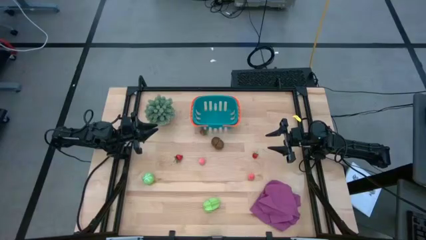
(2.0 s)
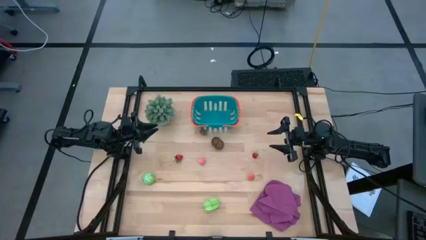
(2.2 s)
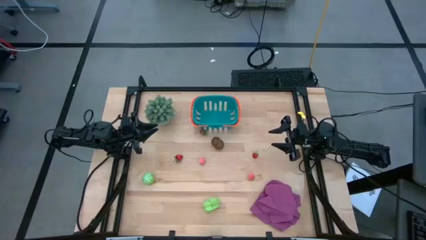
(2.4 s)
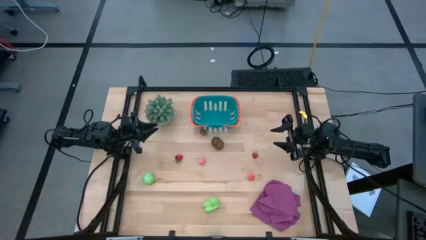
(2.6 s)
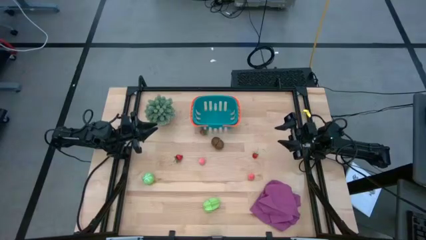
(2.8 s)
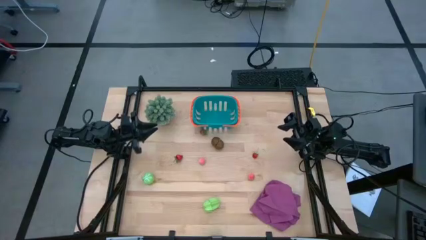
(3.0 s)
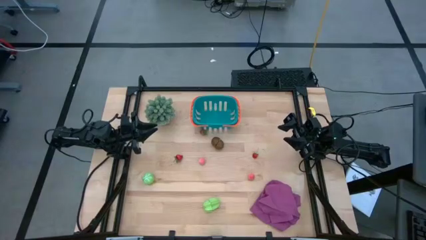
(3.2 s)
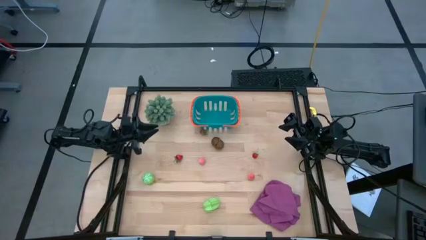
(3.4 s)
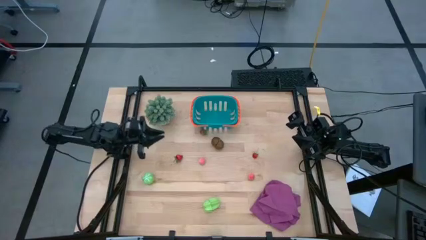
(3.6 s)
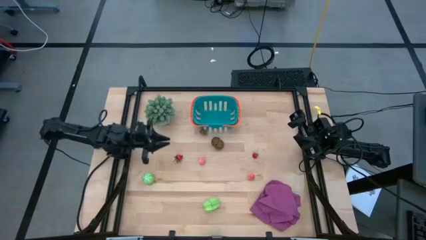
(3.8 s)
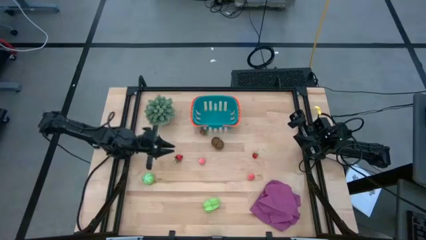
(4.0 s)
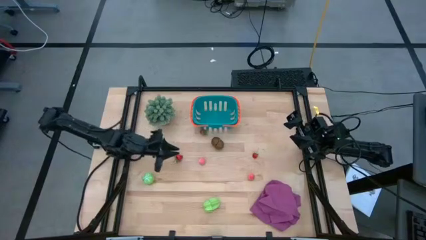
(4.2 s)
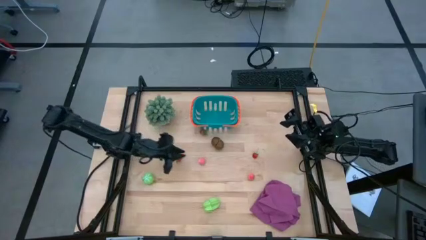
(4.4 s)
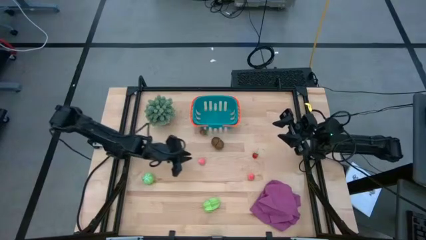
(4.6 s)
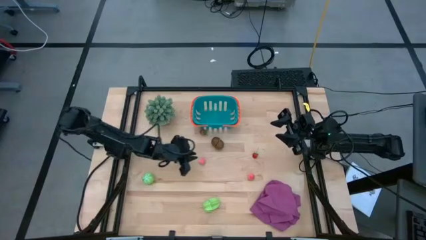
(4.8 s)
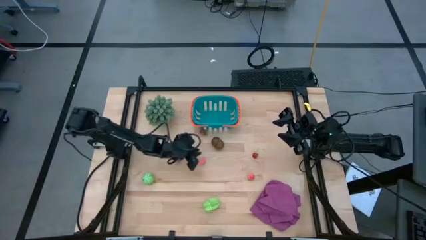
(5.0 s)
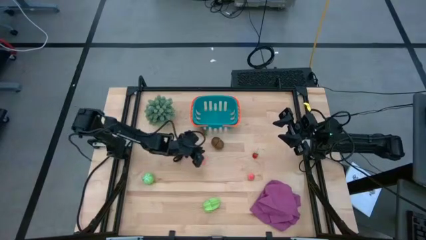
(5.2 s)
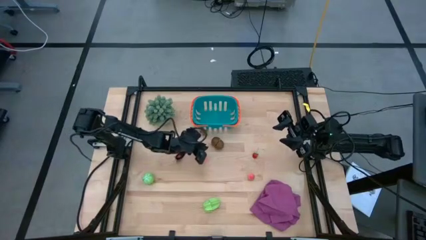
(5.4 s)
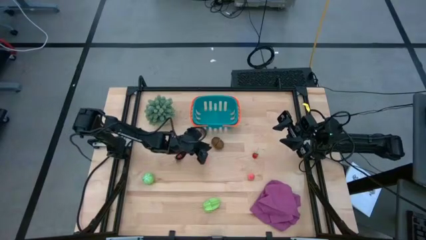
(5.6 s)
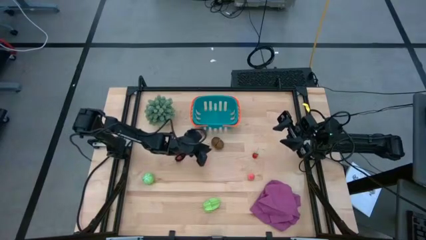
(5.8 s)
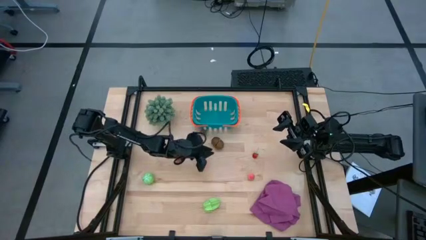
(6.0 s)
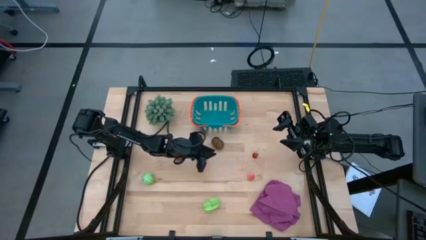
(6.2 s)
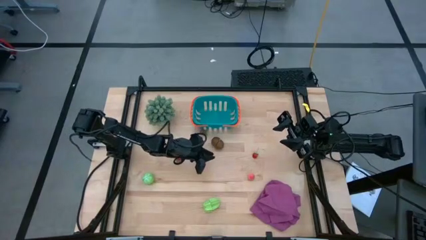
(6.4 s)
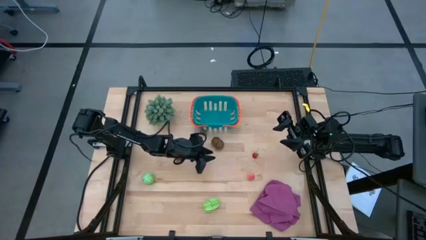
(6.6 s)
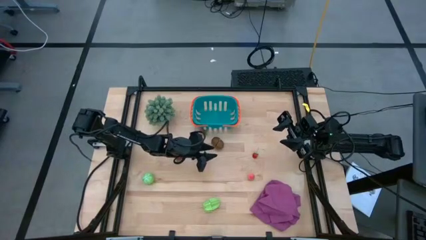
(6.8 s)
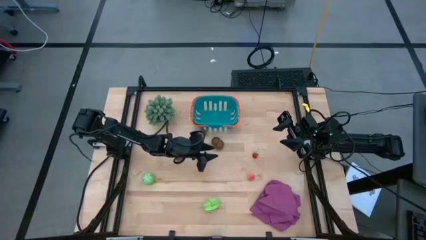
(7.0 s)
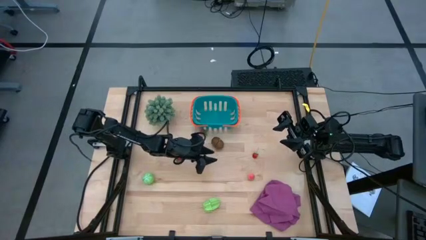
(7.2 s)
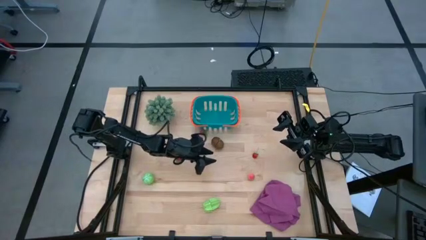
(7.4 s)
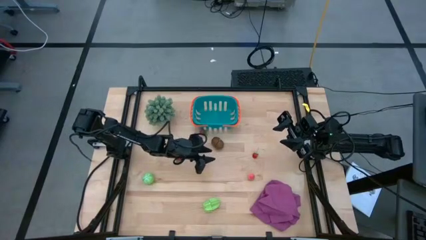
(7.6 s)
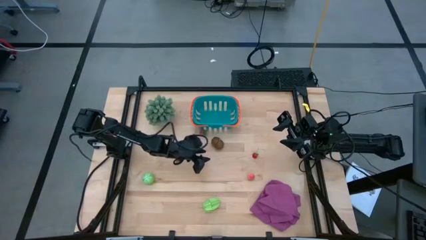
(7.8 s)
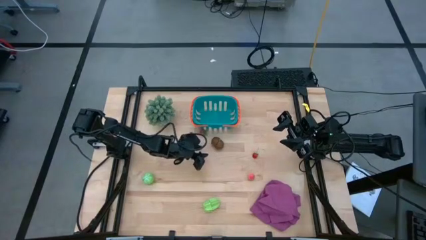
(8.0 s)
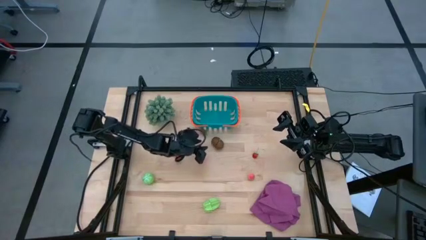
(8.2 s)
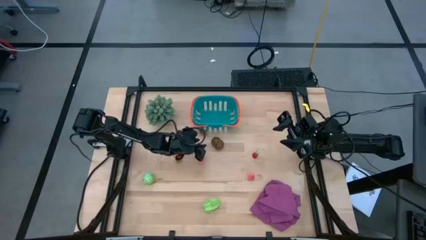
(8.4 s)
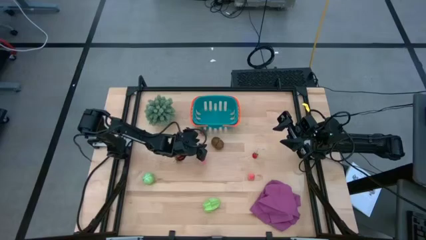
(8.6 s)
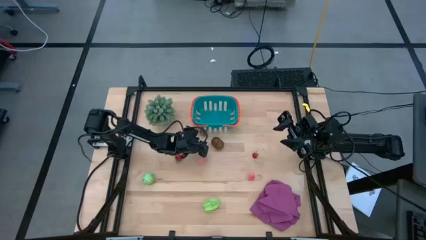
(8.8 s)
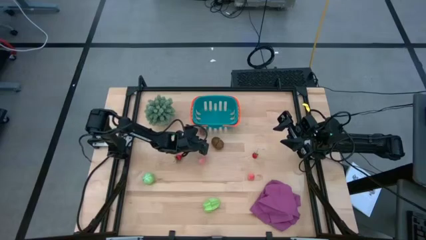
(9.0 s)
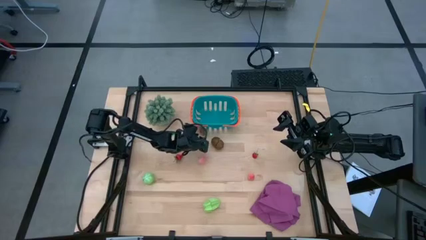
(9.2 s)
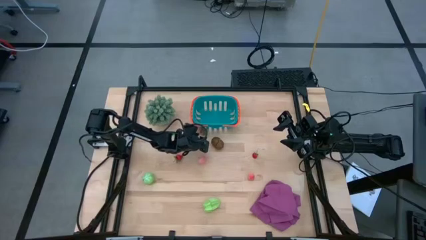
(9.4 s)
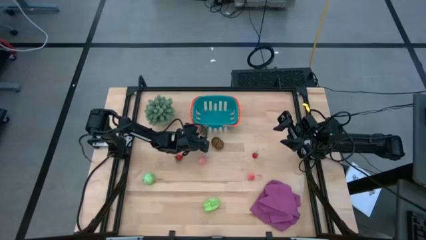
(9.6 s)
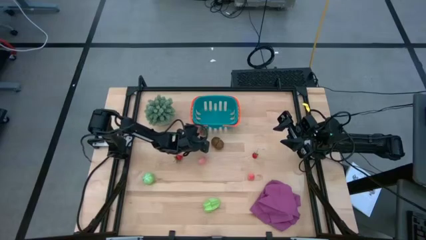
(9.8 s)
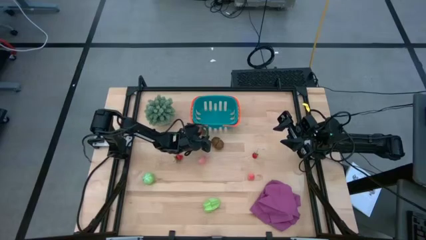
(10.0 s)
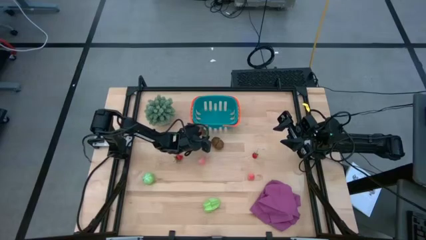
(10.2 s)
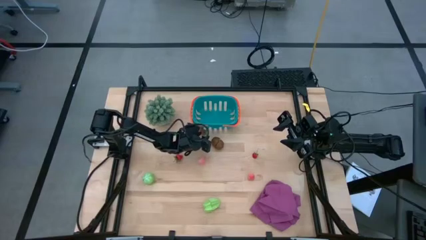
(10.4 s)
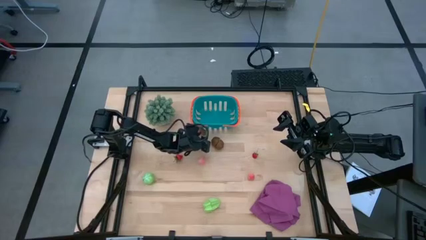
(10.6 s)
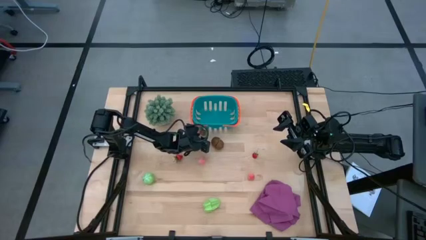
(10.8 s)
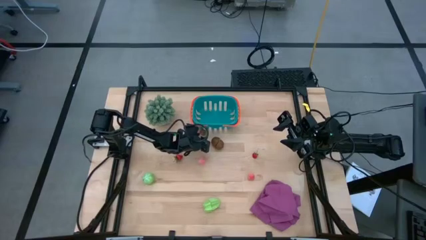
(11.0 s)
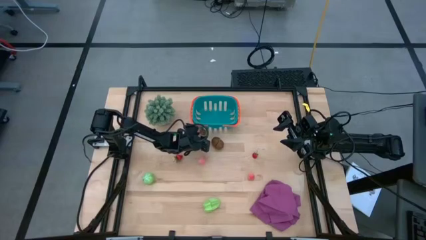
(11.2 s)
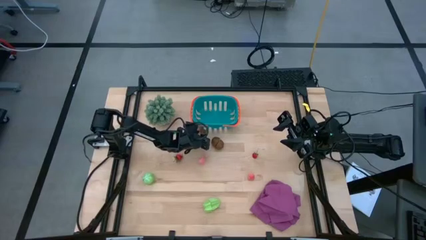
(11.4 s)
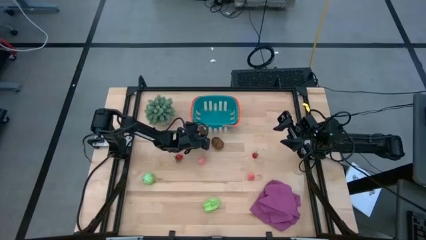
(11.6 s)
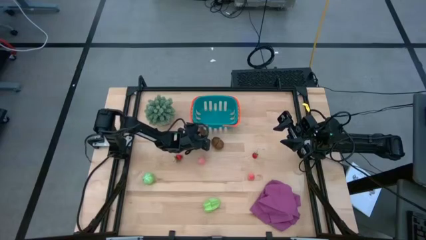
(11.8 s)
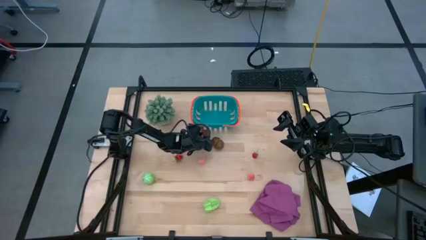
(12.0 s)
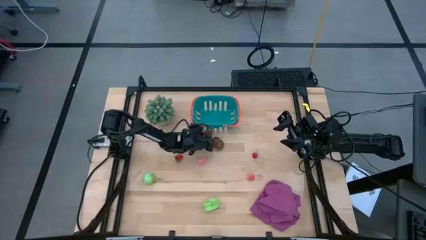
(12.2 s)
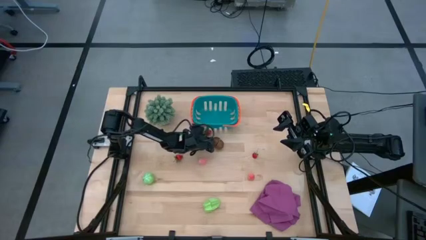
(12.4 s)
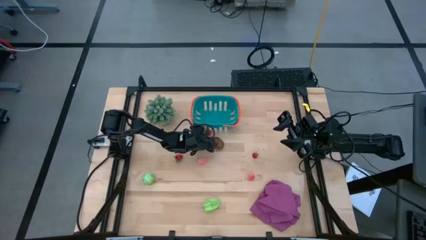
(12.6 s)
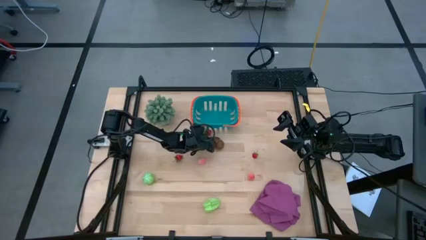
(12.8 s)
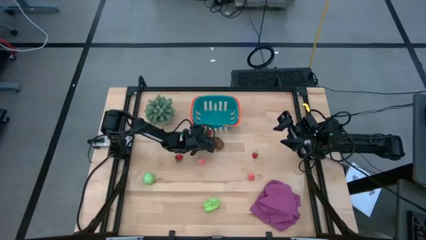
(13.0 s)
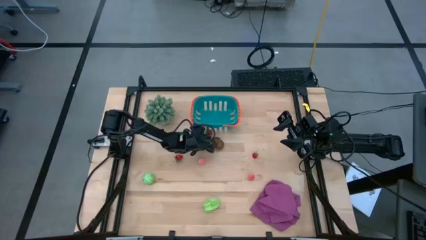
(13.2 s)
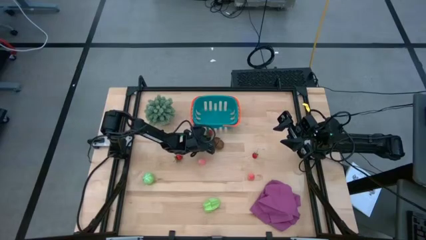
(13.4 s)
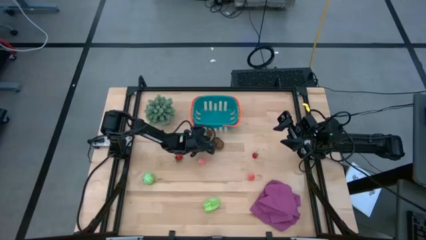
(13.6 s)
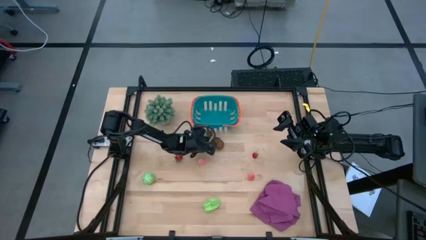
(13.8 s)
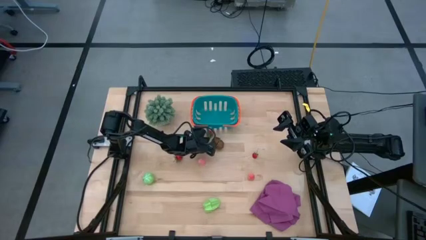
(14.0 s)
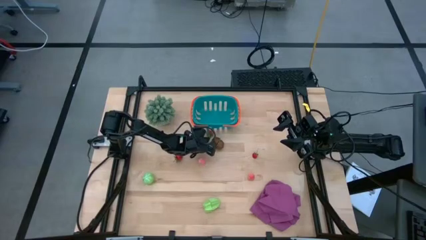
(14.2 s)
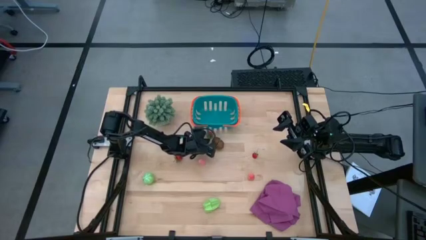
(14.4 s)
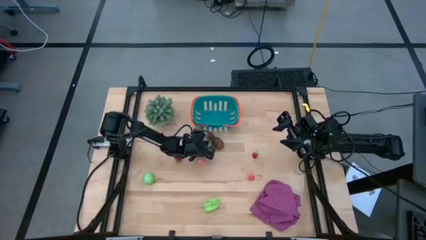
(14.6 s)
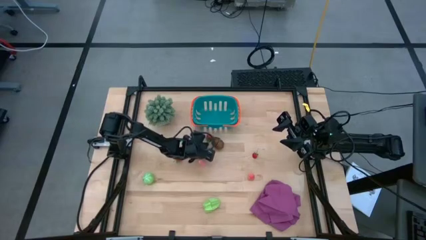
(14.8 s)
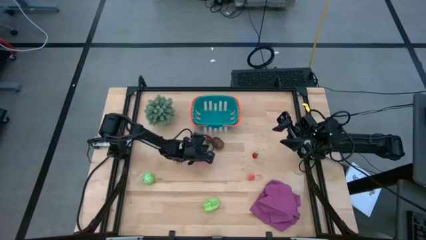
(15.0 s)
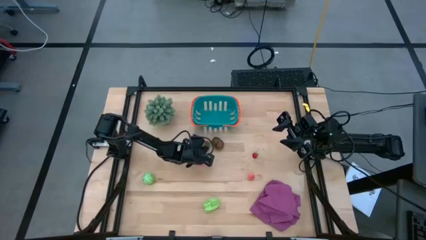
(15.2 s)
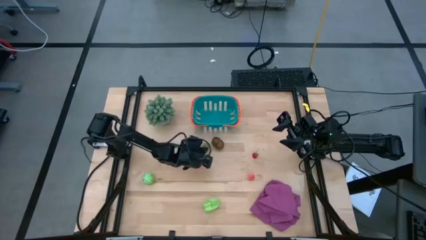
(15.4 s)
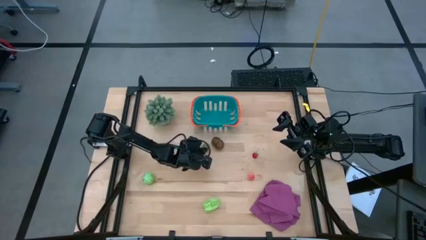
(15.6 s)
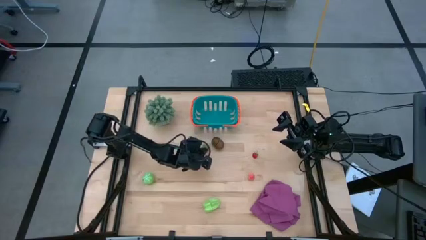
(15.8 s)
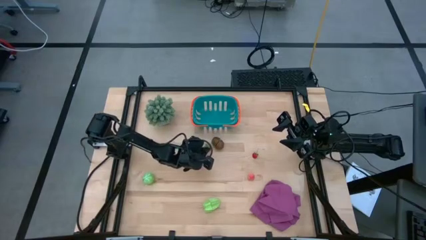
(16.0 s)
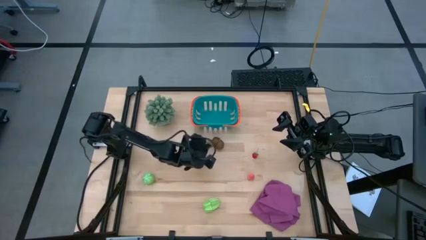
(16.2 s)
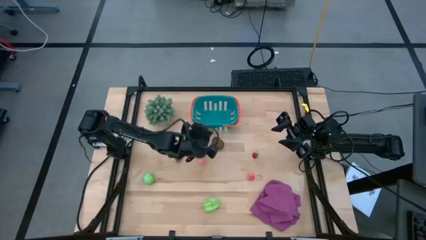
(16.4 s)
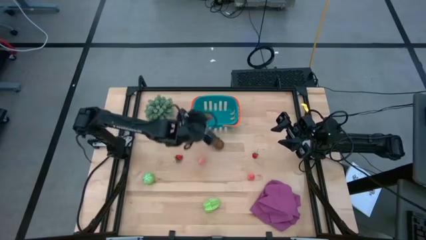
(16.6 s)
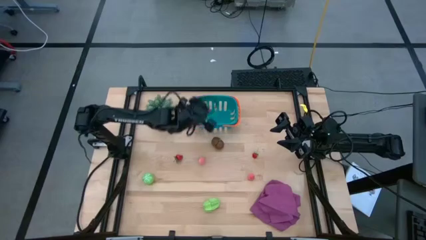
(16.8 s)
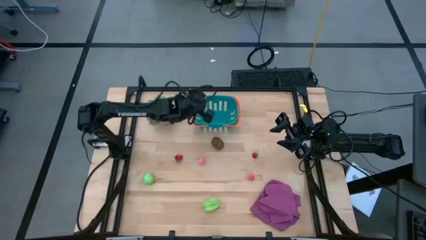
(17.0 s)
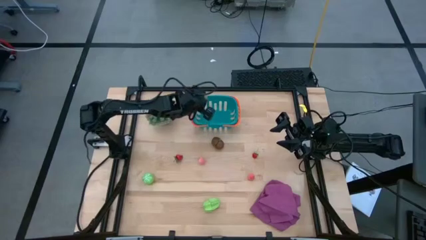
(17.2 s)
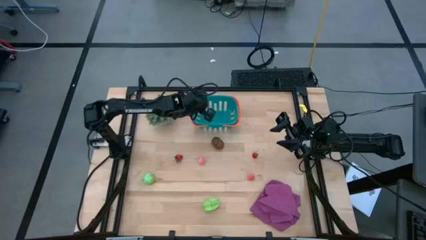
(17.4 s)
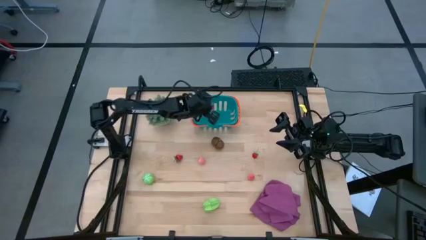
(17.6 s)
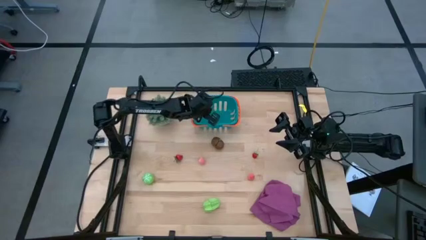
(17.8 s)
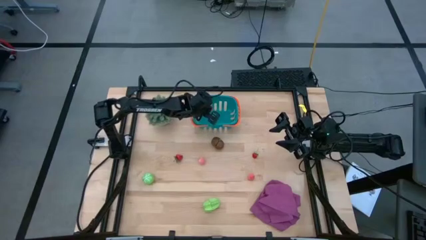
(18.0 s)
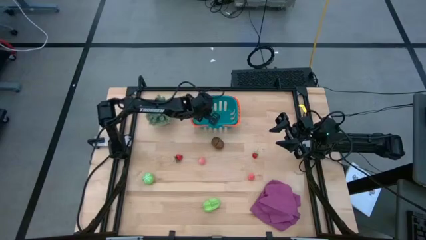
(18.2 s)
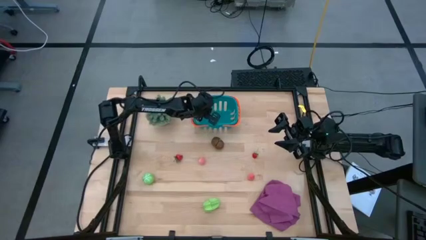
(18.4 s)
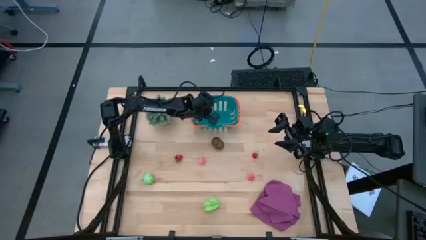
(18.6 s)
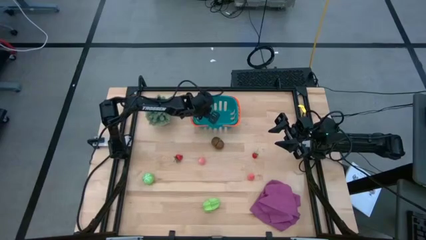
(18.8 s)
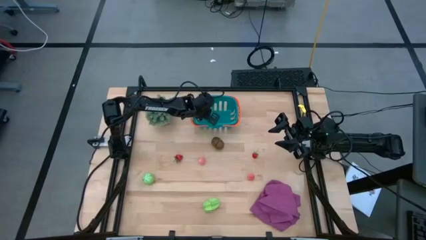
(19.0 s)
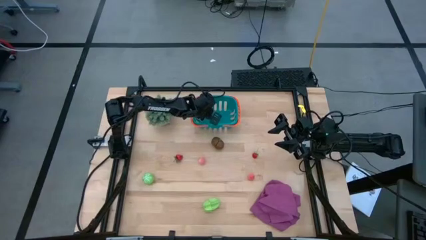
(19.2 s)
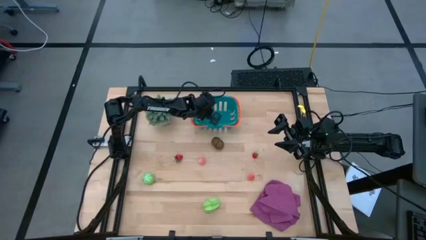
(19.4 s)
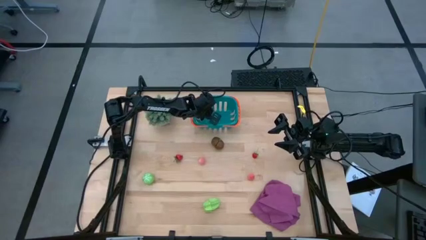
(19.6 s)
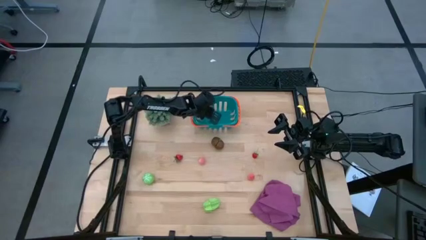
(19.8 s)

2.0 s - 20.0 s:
Task: Pick and placing Produce into tupperware
Put the top red strawberry into the blue basket
